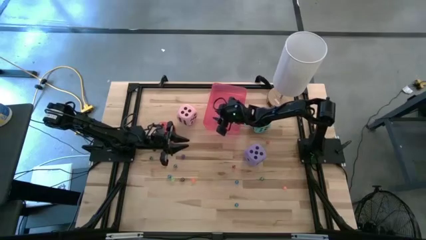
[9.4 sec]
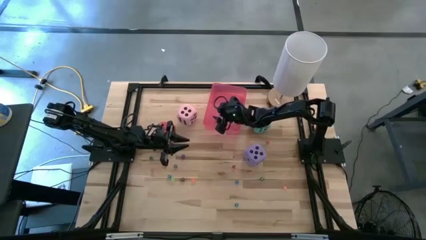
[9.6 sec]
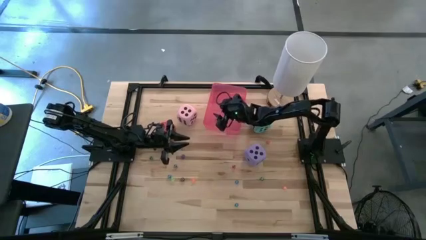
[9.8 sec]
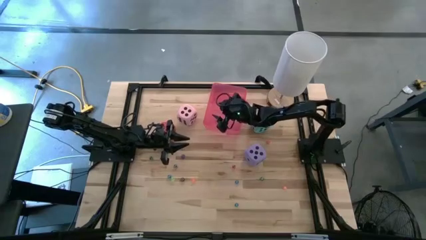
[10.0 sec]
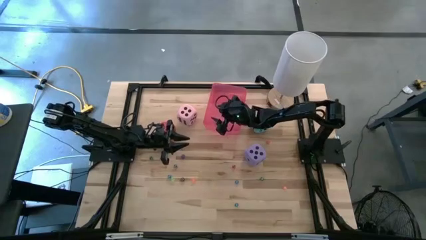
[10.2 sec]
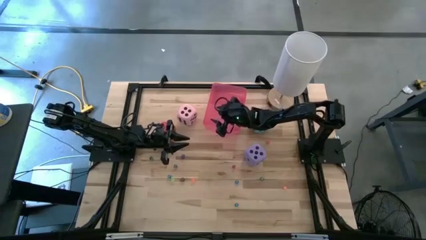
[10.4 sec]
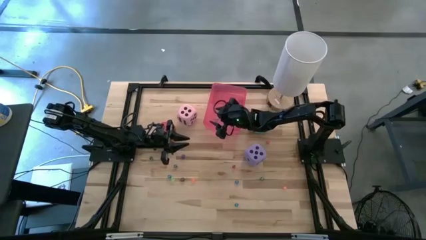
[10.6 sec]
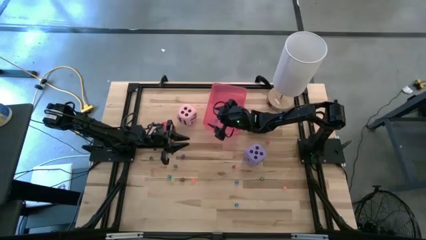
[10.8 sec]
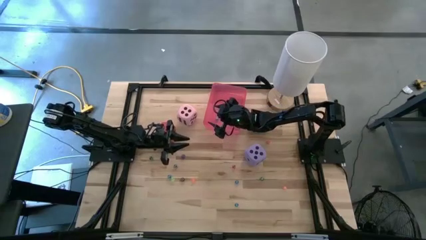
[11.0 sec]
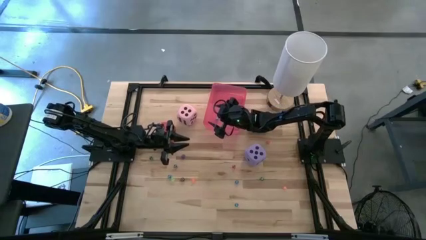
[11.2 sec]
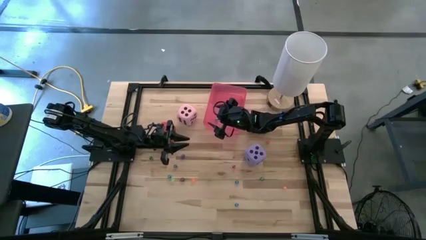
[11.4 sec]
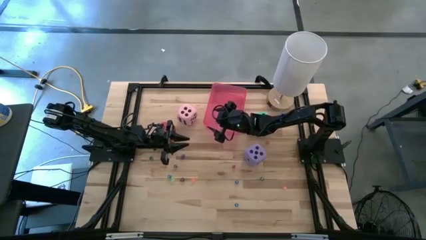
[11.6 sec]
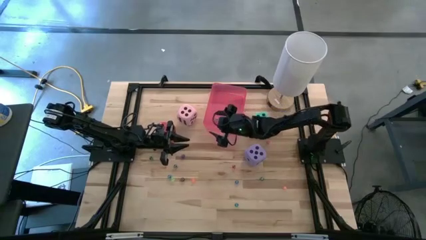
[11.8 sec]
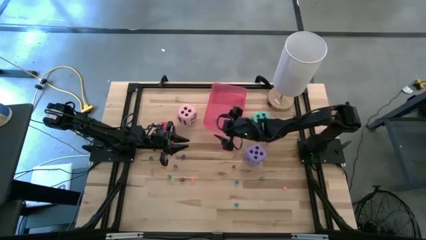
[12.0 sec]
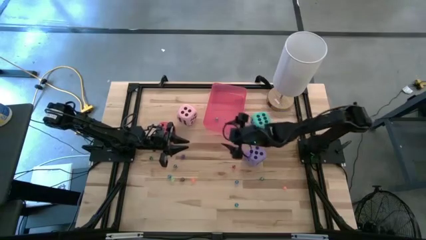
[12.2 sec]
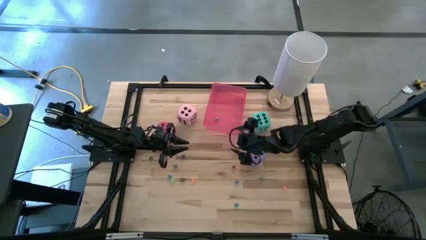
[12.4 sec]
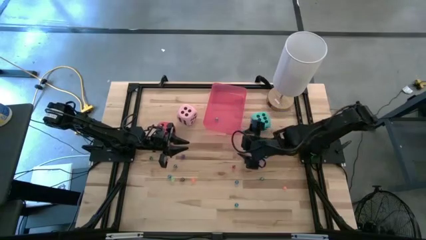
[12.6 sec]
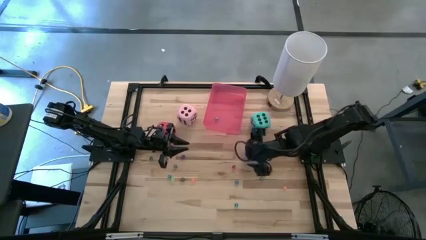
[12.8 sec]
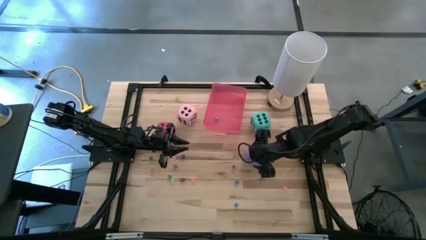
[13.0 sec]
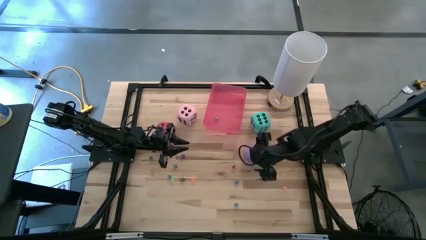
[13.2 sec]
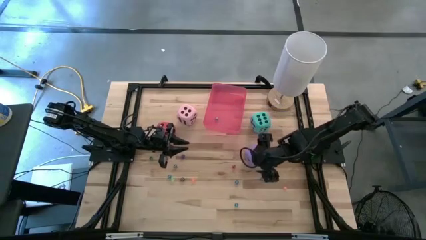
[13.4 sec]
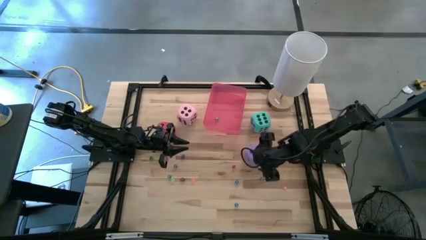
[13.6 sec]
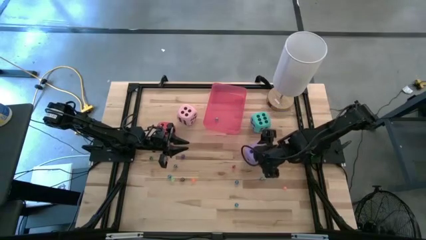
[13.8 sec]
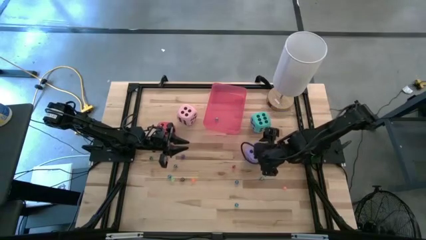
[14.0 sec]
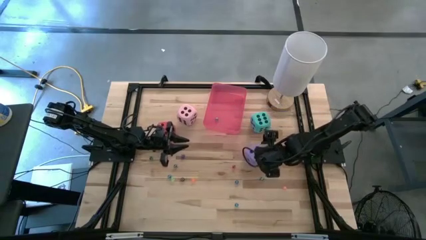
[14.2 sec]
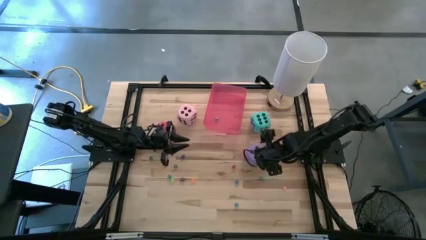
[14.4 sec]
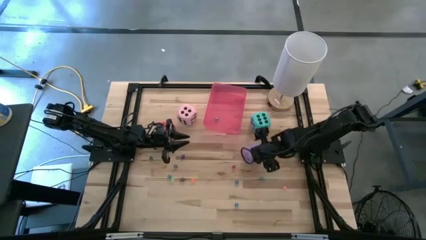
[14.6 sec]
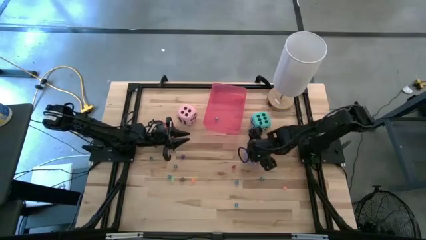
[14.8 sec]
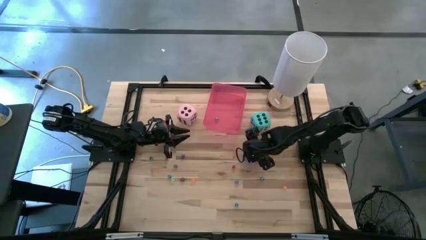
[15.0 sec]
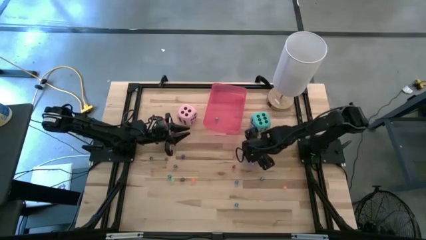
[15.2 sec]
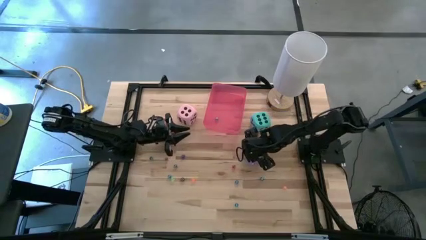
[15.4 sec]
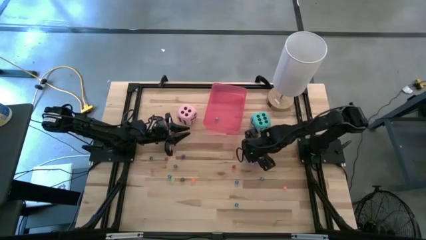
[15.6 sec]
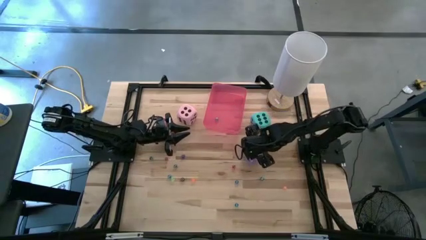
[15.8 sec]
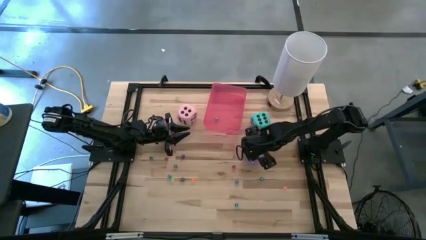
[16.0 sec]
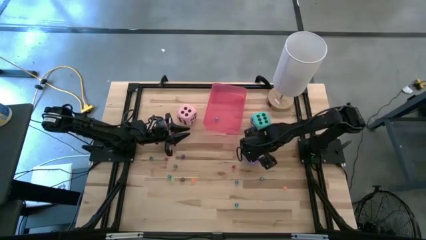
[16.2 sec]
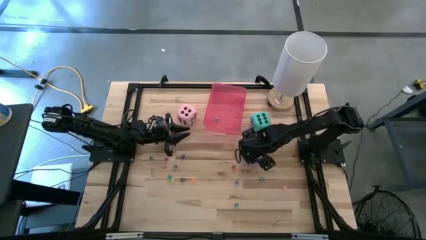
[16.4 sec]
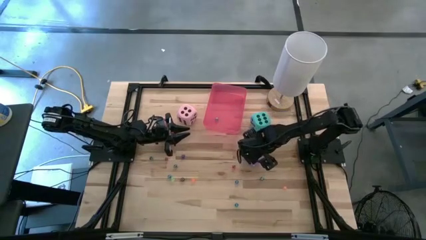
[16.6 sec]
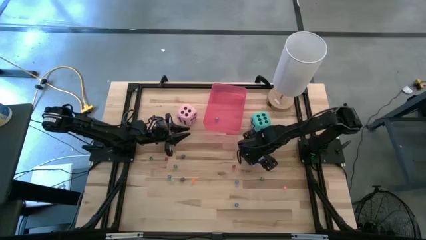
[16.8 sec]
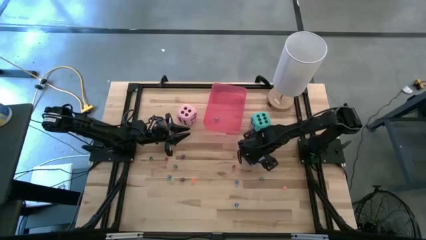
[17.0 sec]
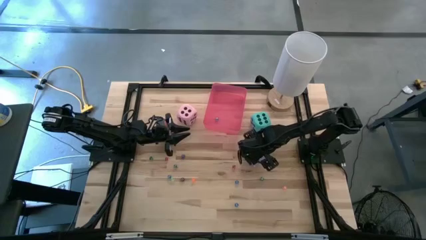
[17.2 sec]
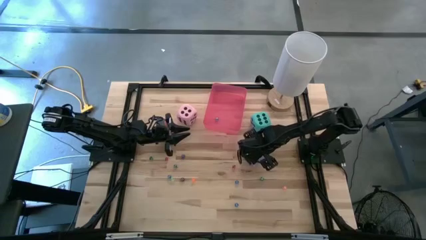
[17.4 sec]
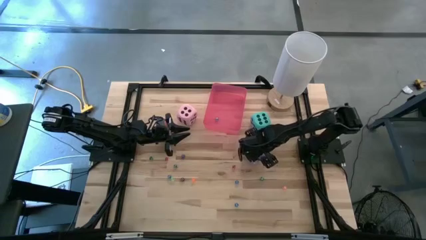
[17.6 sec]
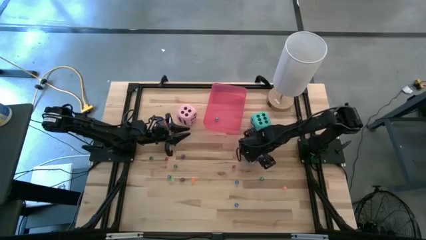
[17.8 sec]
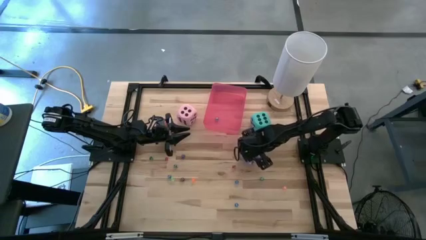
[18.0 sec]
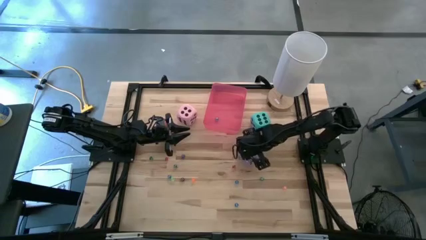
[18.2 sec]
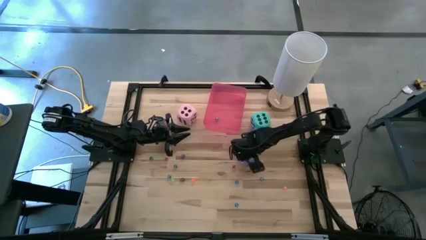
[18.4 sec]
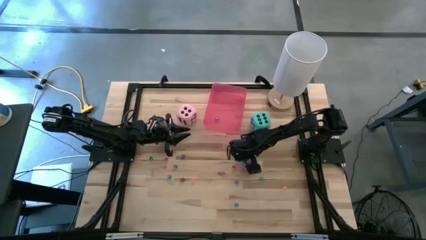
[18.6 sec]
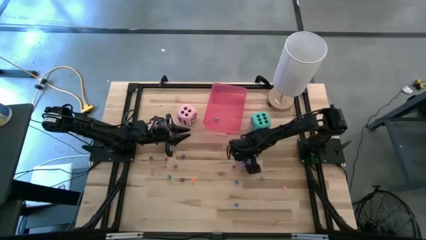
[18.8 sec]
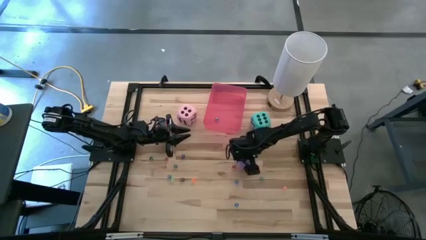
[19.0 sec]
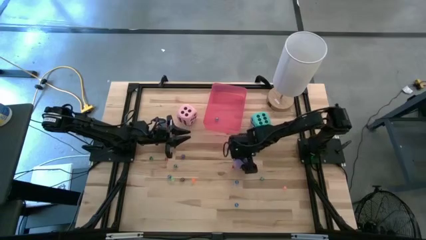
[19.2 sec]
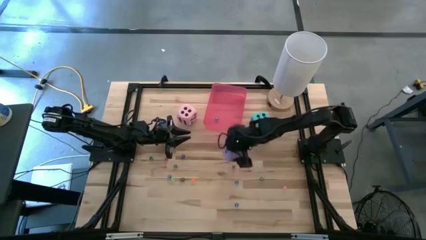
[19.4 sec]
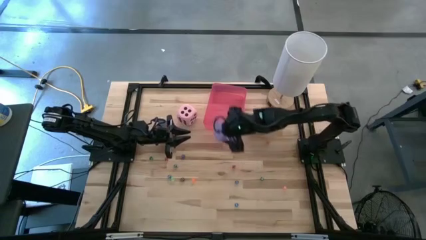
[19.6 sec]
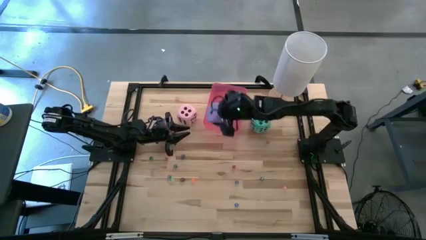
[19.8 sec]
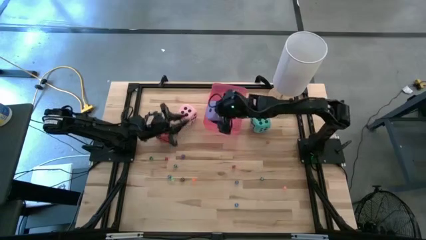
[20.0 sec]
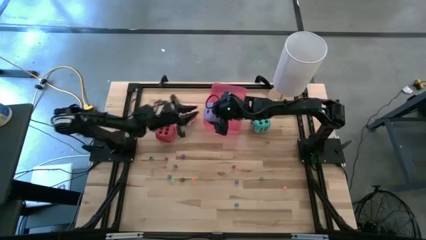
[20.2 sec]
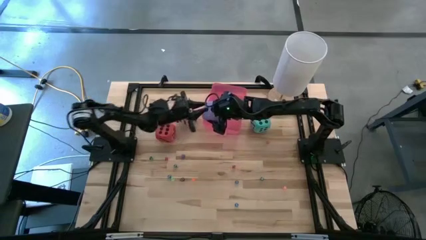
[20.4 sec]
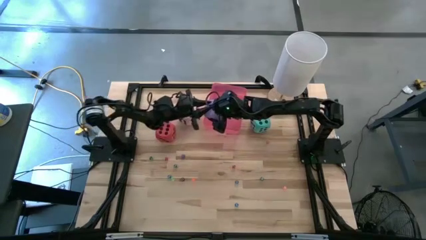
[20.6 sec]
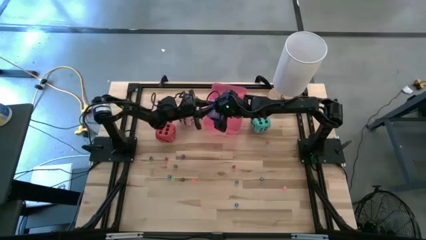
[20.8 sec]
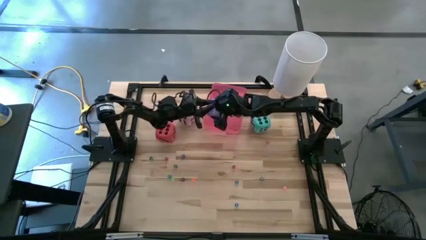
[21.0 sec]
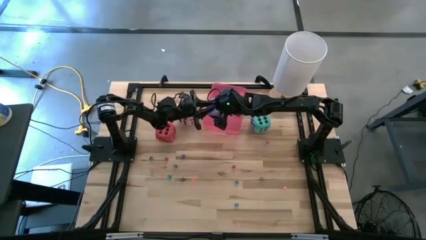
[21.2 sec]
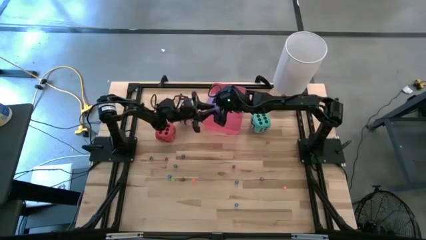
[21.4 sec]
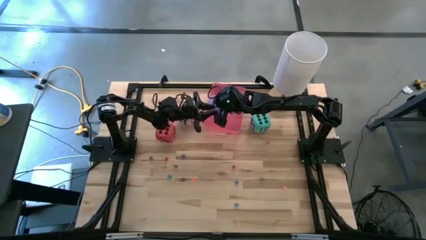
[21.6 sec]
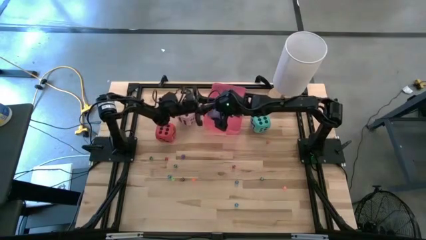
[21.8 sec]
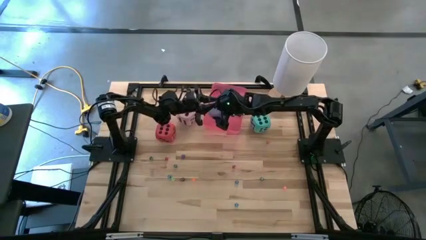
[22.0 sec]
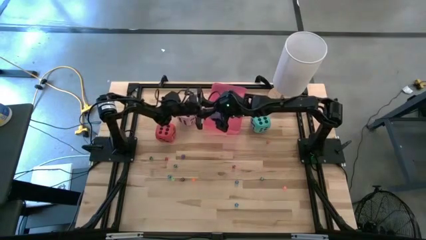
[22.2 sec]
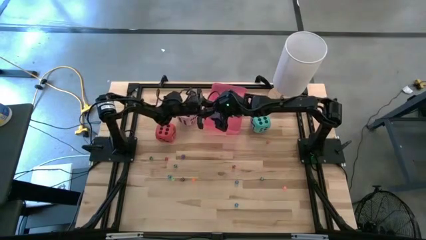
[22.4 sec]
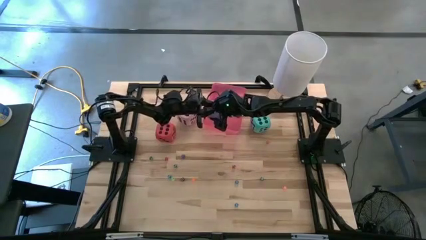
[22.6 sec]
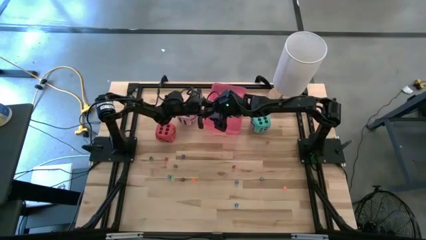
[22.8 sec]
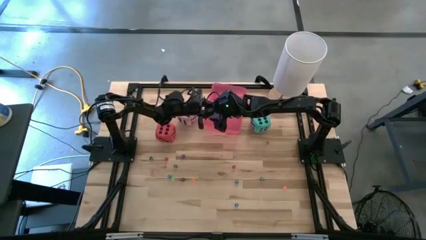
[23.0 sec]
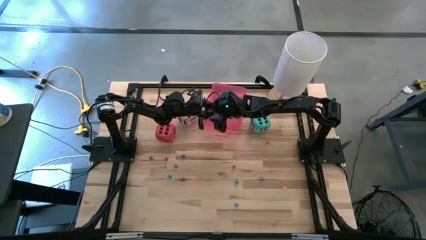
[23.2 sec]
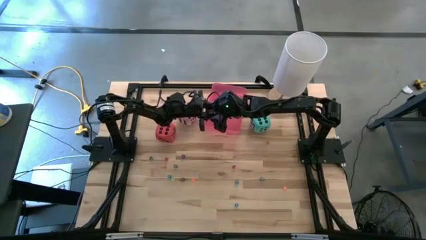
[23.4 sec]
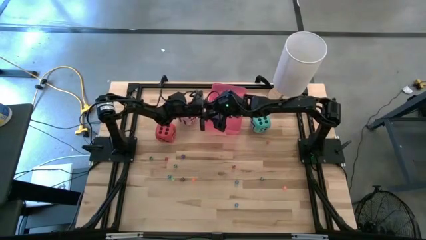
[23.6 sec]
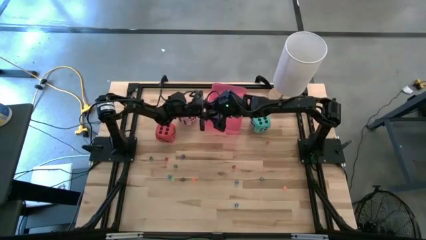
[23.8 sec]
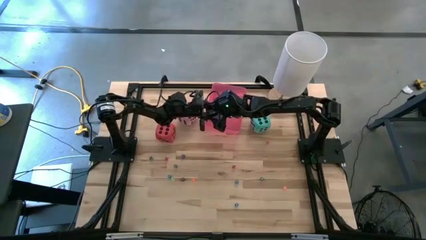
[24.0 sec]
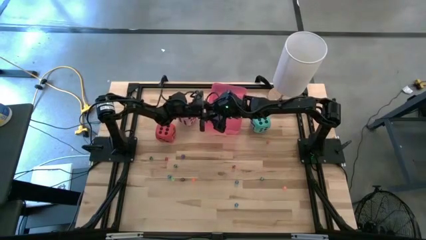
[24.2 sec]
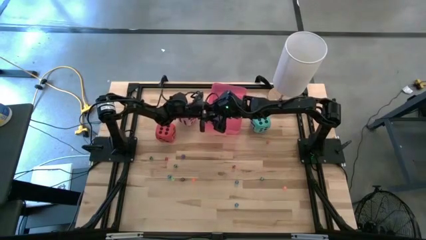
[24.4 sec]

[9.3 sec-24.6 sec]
Task: Pick & Place Dice
Put the large purple dice into the bin
